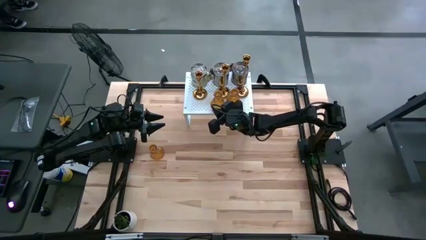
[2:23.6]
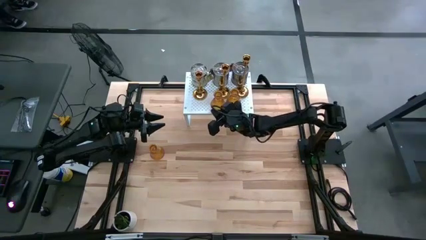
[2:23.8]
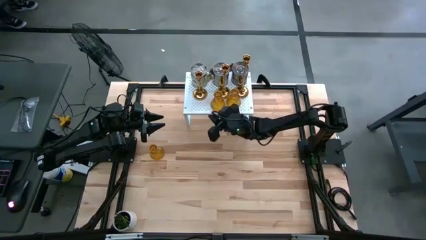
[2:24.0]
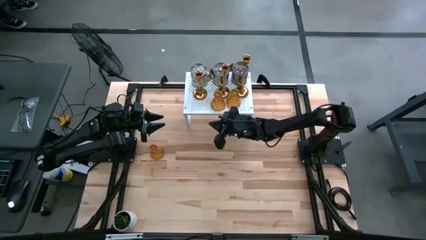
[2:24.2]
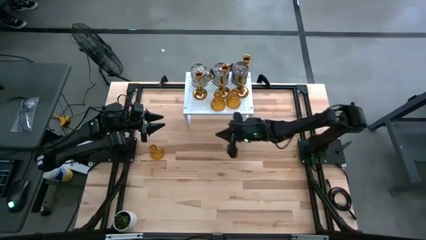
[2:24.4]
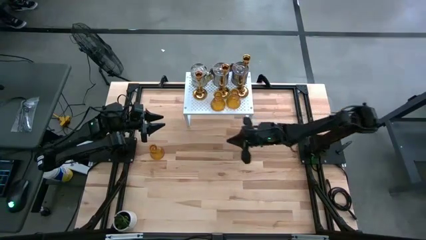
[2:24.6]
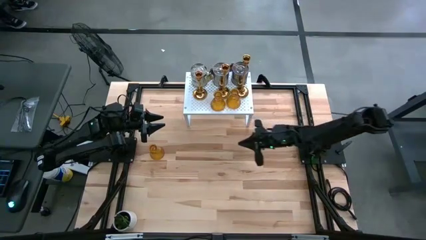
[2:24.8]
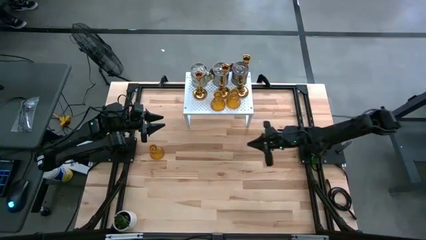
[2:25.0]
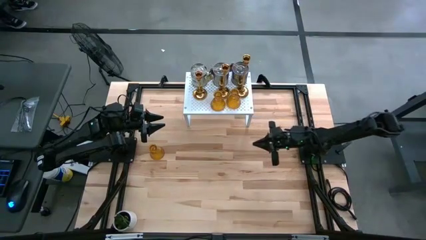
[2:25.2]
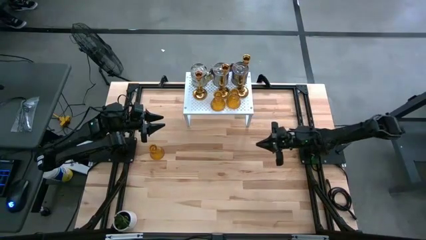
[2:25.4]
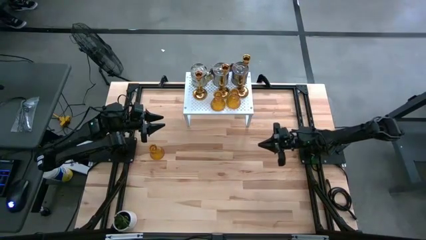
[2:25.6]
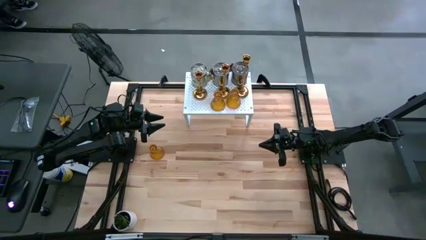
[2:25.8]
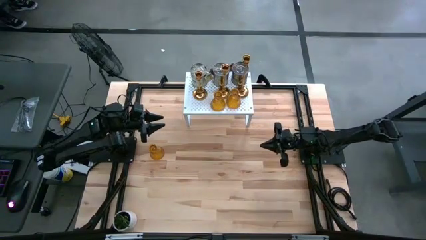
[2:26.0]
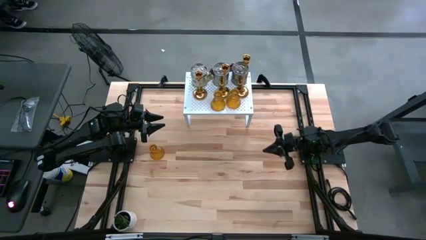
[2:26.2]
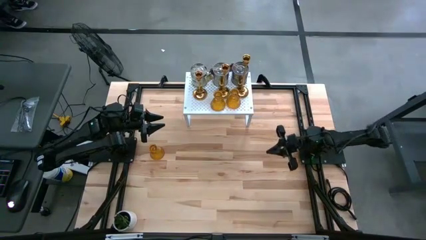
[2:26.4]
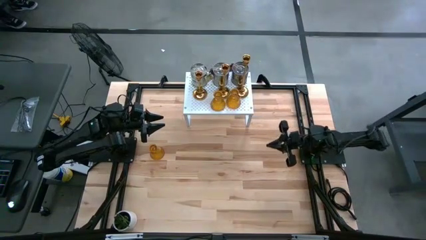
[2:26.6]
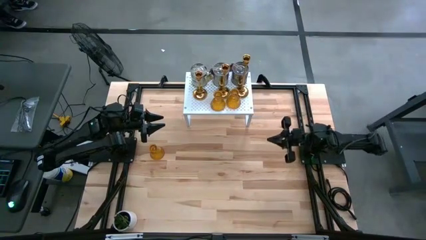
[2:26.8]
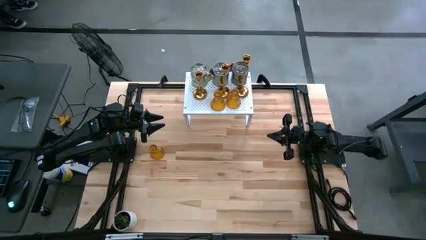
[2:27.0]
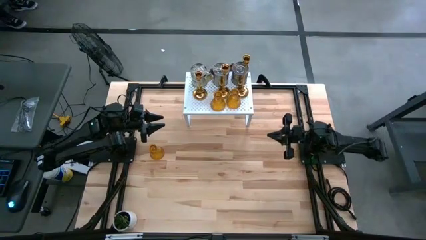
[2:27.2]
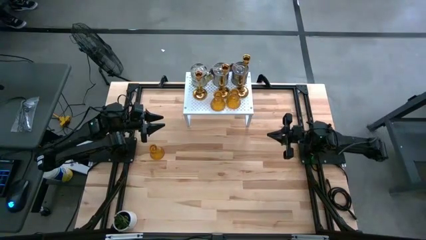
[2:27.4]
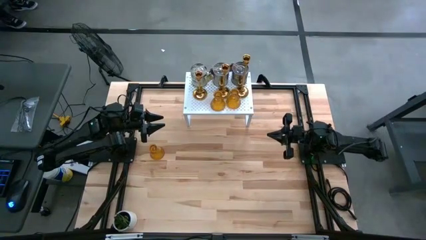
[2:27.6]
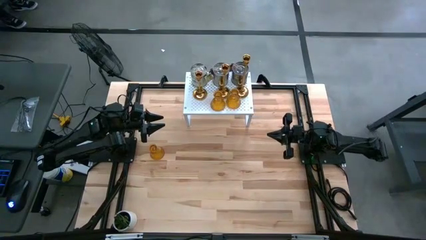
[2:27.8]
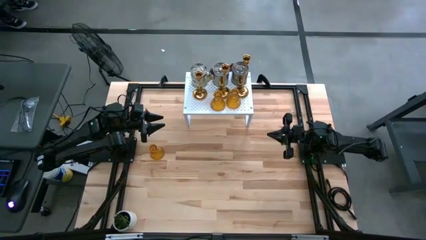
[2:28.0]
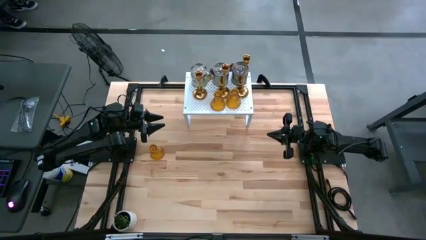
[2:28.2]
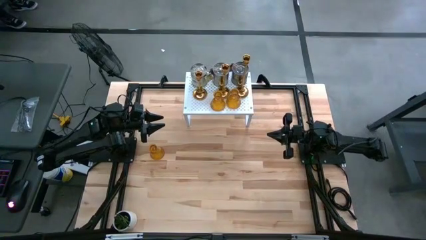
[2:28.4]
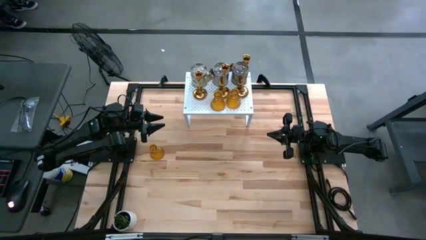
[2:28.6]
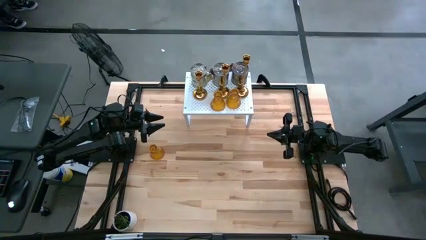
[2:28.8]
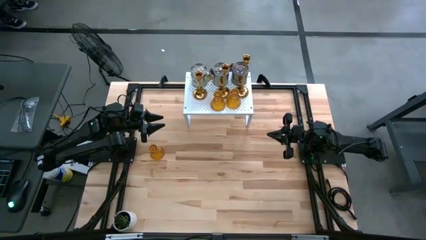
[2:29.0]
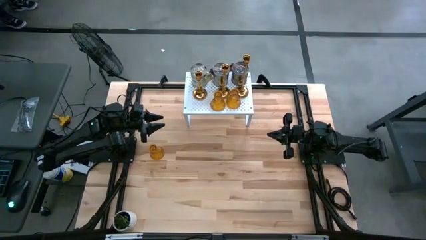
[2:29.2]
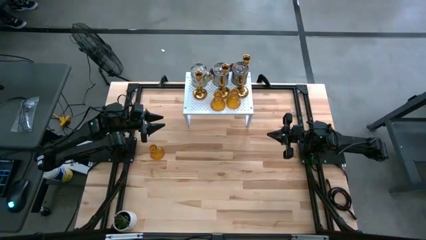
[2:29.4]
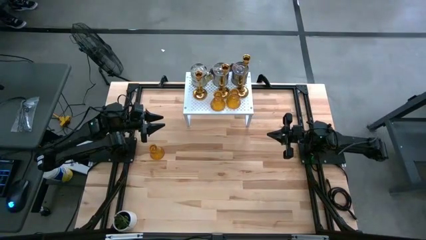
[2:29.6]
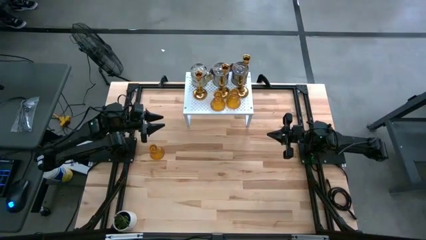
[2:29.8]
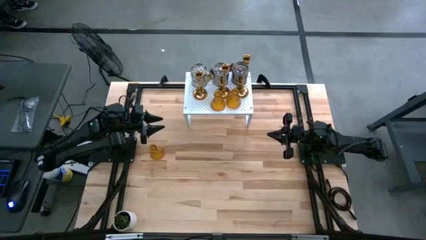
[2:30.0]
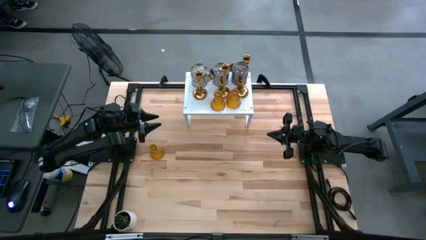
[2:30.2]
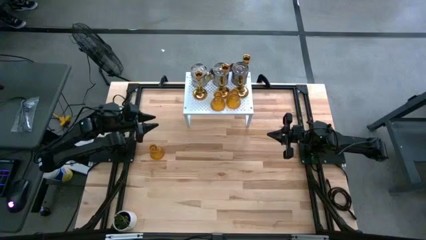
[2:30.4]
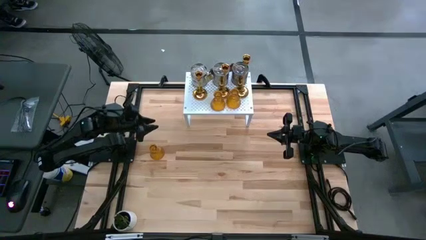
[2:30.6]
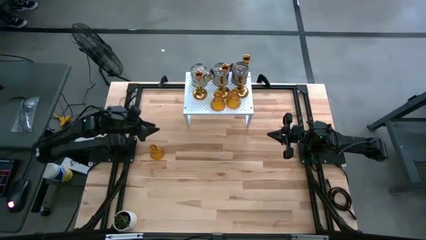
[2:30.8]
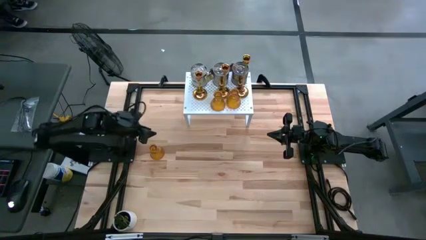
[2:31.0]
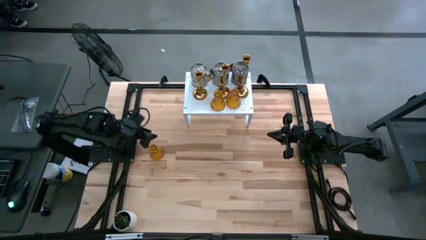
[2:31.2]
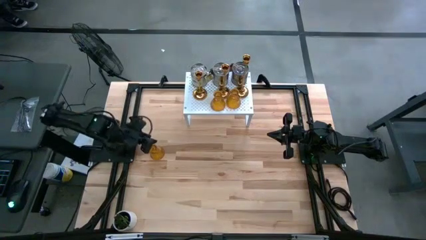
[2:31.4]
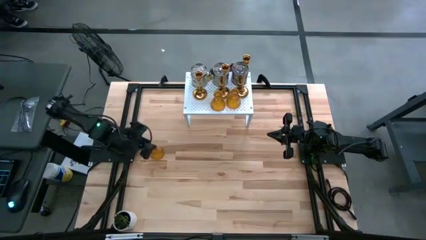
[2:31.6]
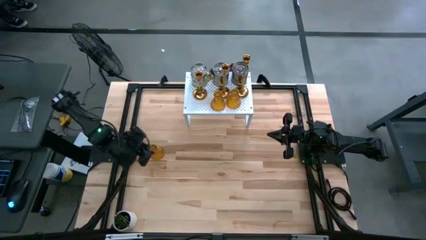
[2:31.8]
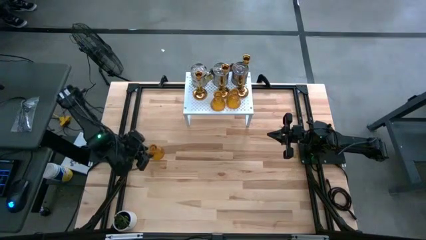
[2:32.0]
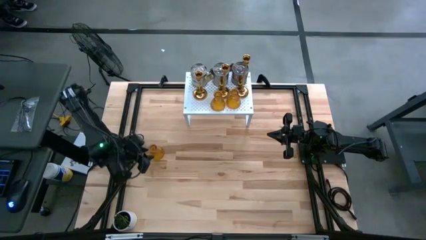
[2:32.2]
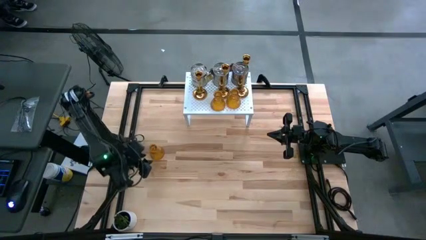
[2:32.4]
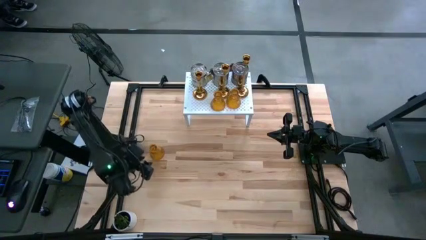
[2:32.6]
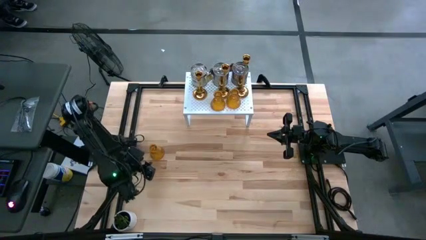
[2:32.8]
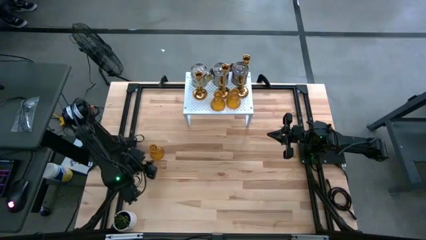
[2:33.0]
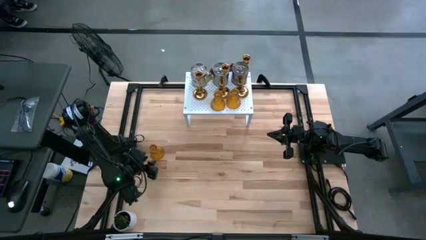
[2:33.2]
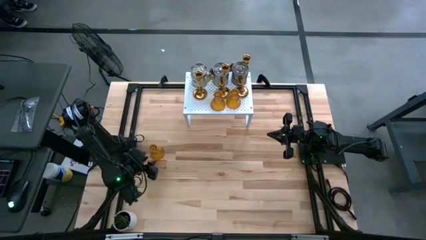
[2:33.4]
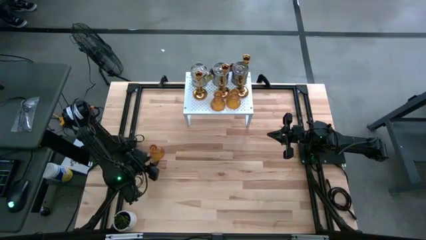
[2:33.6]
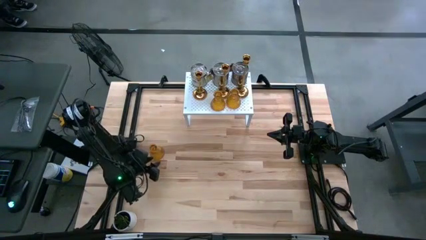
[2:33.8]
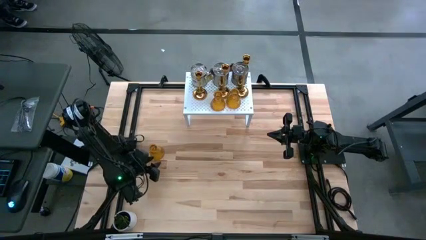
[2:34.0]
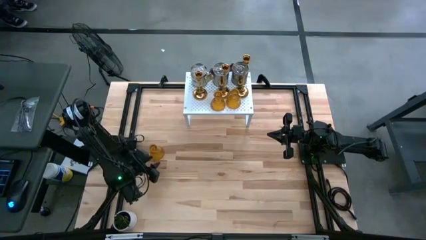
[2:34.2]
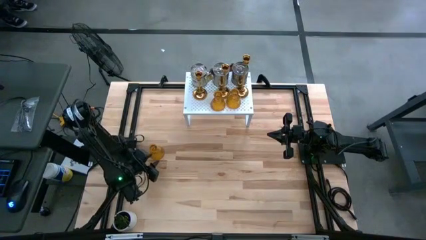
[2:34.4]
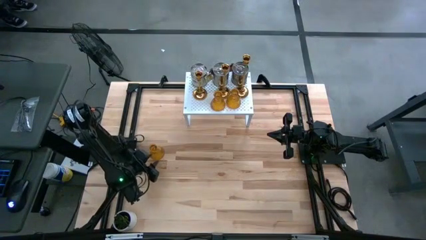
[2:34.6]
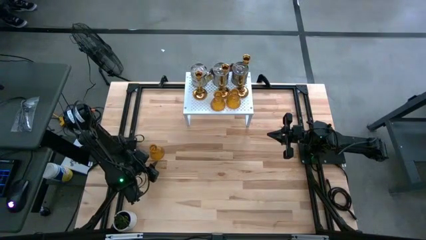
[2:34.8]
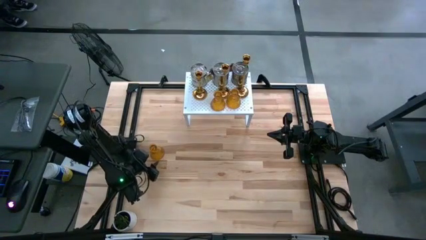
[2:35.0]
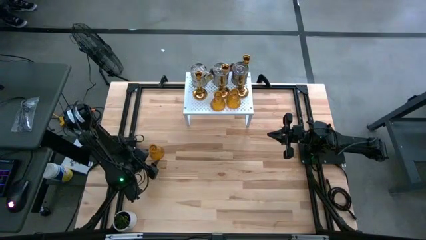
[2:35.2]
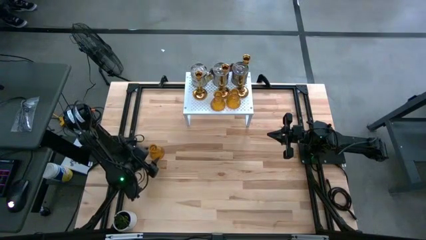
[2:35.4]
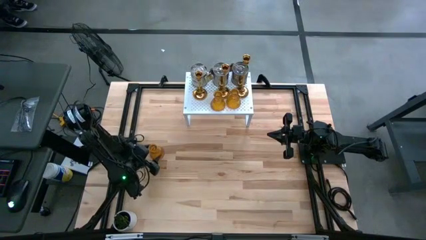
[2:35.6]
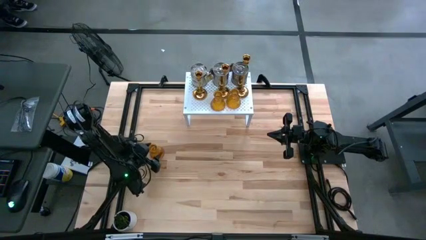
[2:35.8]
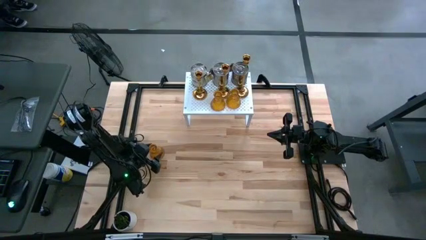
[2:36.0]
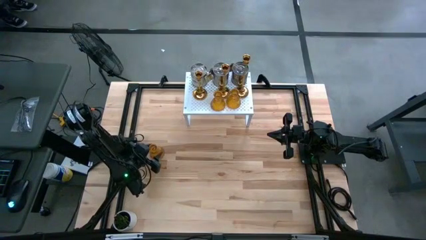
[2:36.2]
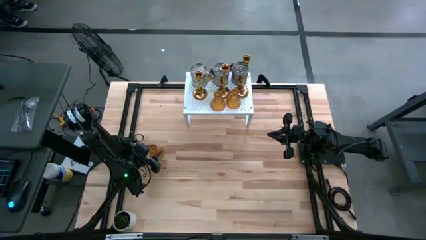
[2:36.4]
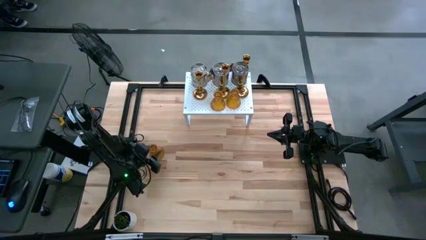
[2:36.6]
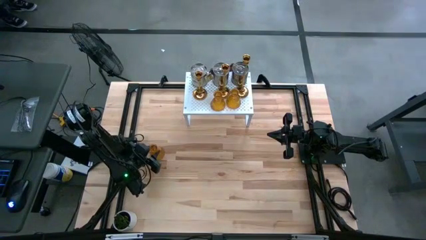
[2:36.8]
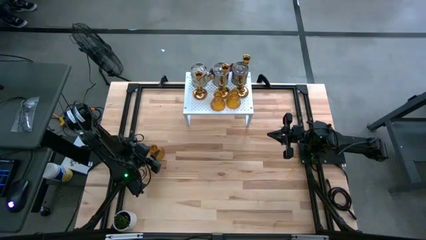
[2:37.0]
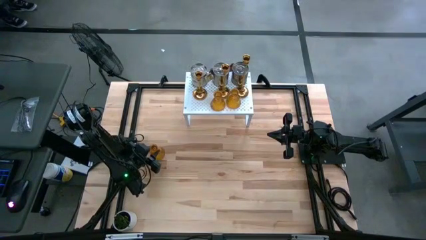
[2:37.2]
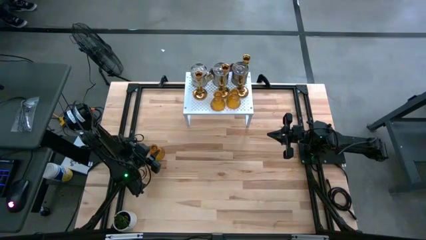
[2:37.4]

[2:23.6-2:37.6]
Task: Pick & Place candle stick holders
Put the yellow candle holder aligned with the other yellow candle holders on the shelf

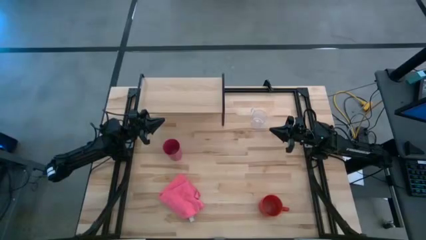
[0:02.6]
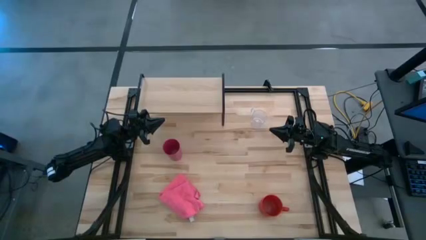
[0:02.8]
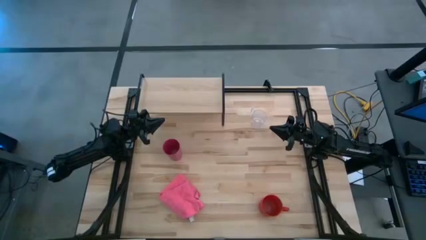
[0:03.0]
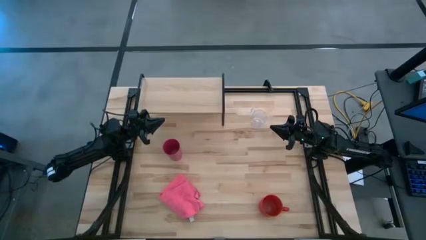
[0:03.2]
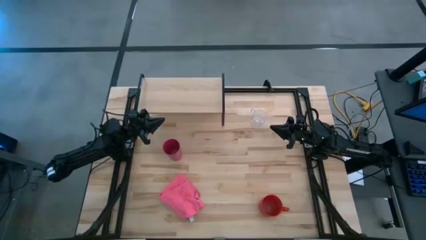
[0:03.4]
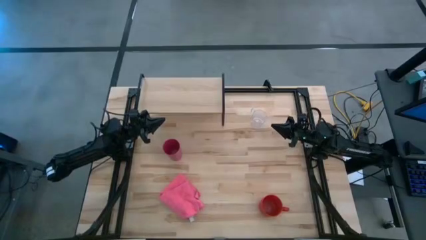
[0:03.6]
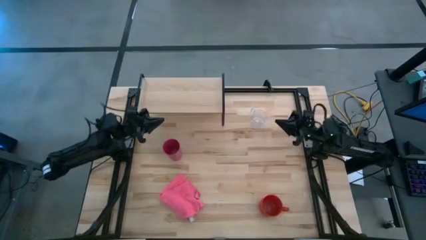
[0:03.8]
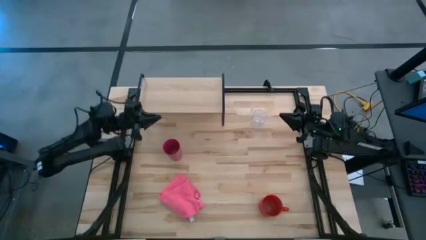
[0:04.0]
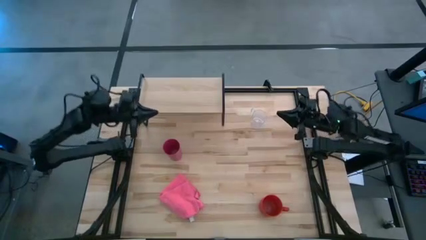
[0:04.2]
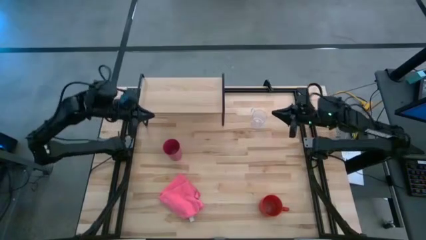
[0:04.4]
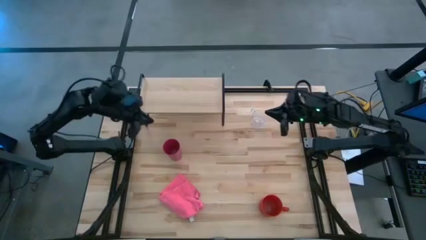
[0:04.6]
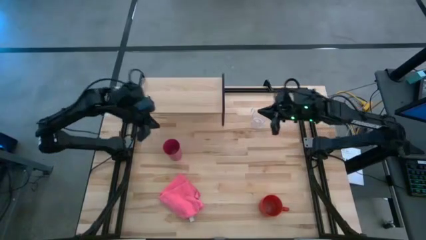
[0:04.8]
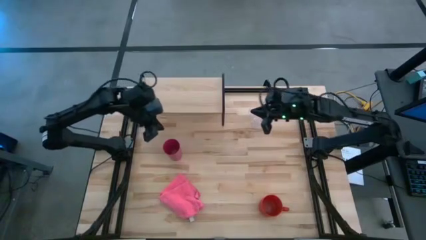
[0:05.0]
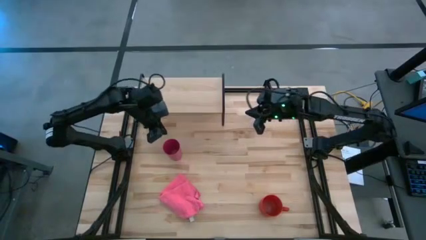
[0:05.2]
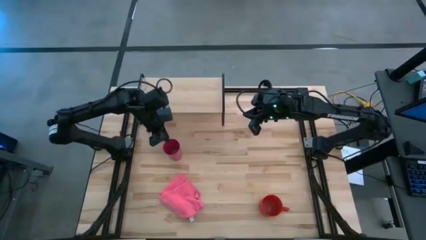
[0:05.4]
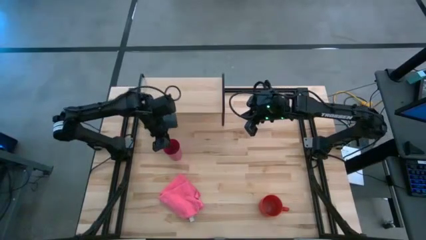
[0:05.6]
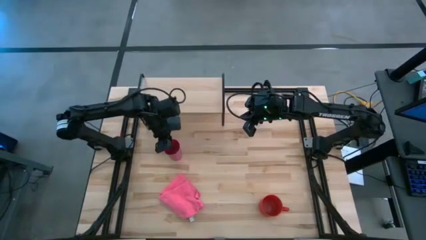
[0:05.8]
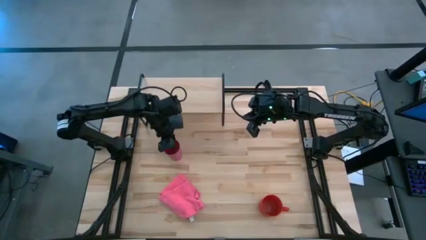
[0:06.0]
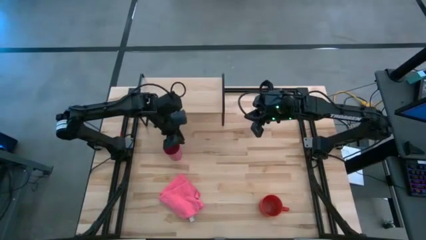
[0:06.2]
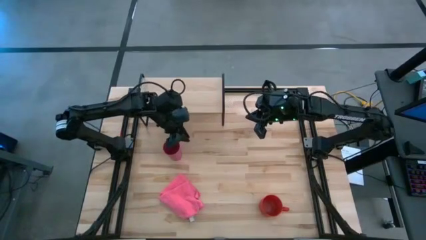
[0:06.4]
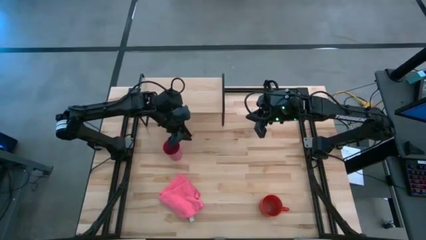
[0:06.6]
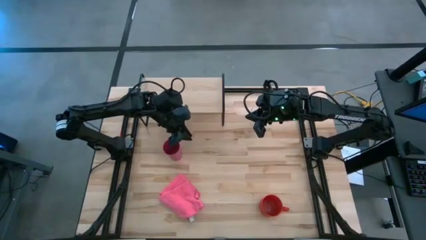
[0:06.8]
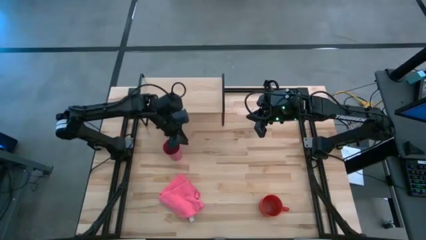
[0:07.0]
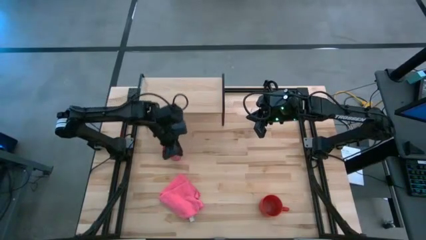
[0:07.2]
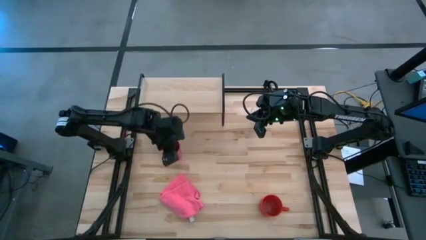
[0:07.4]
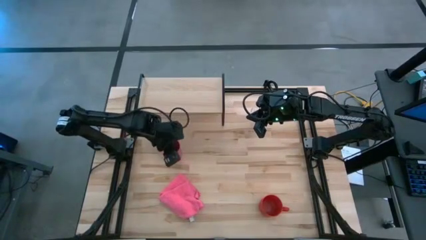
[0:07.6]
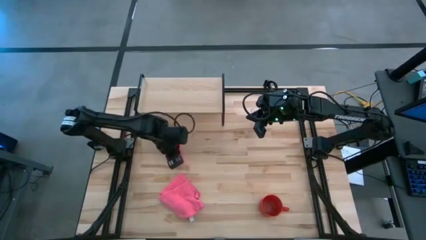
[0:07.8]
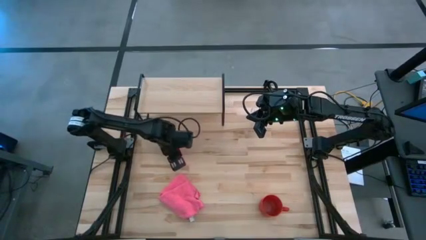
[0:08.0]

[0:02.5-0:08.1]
Task: Stack small to large cups/mugs on shelf
Put the pink cup on the shelf
